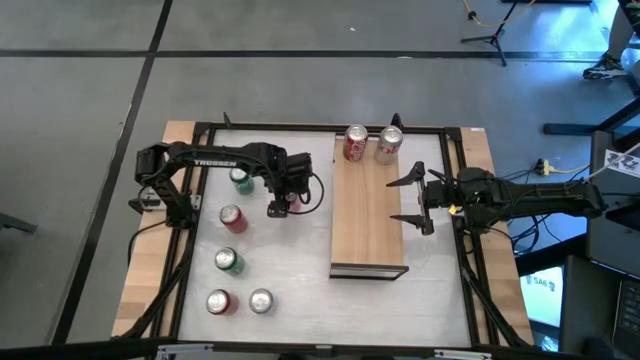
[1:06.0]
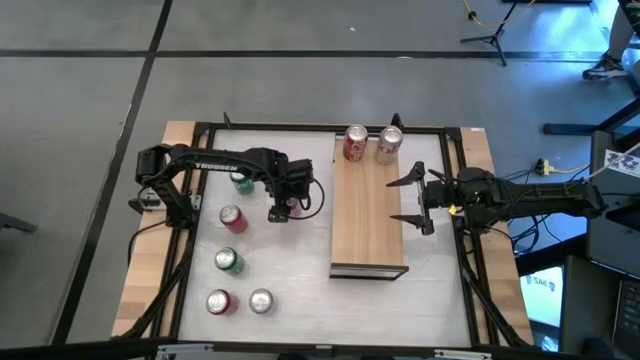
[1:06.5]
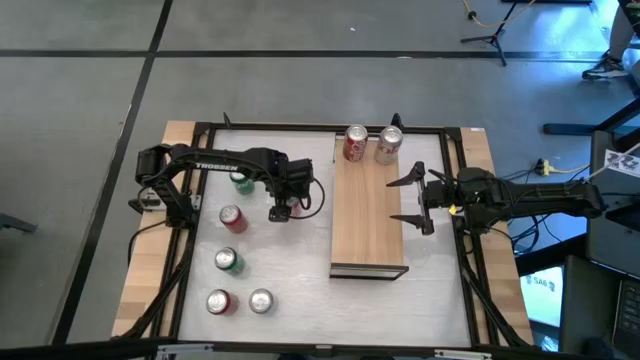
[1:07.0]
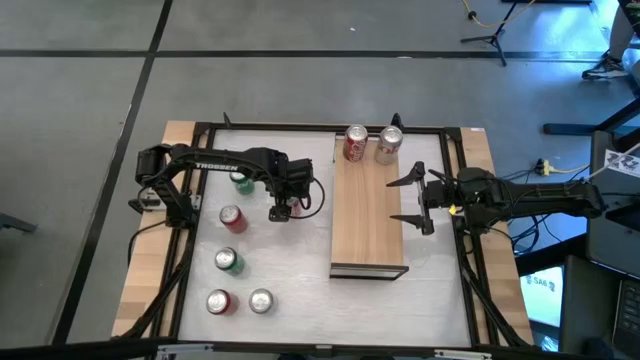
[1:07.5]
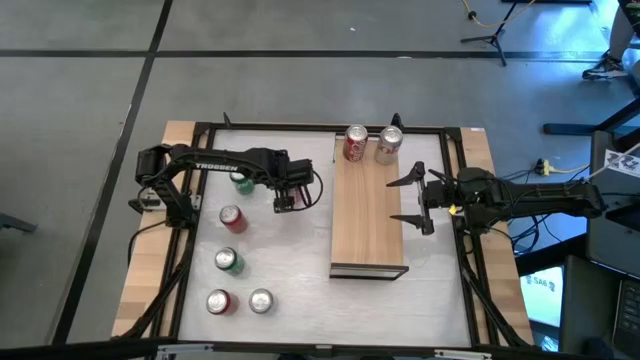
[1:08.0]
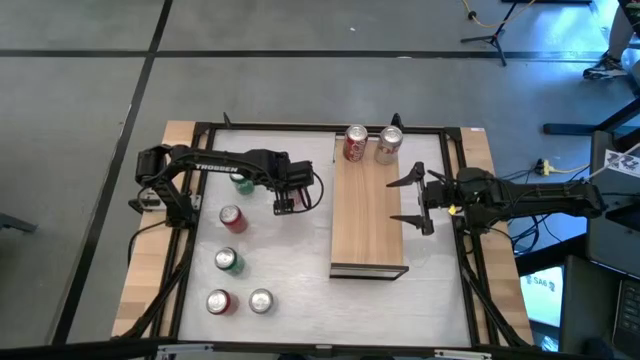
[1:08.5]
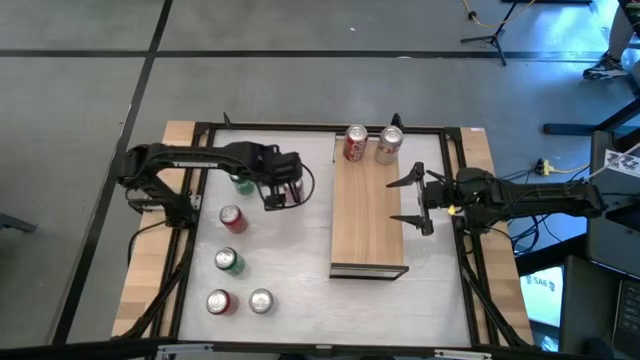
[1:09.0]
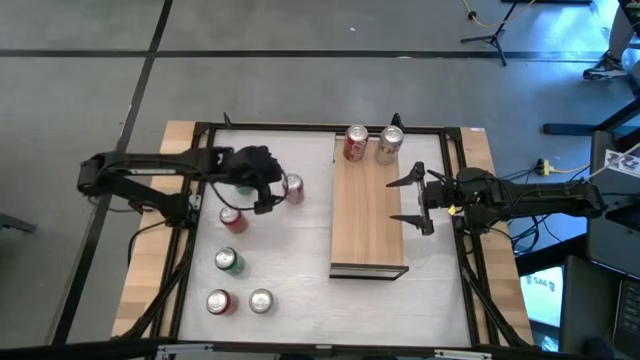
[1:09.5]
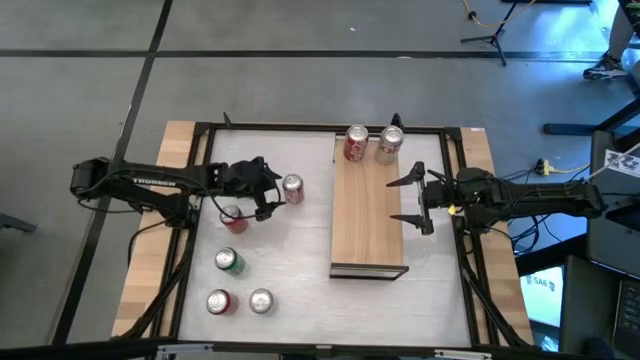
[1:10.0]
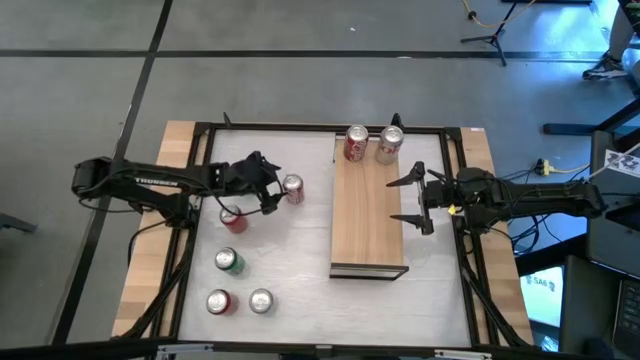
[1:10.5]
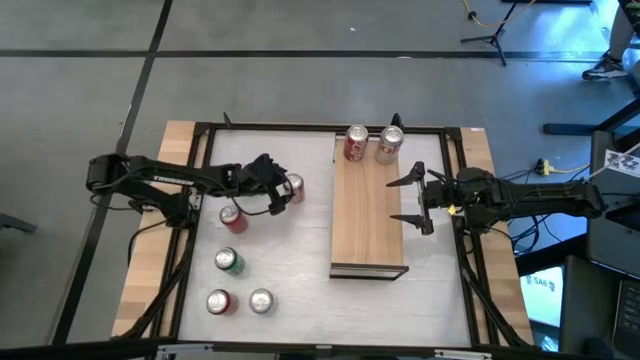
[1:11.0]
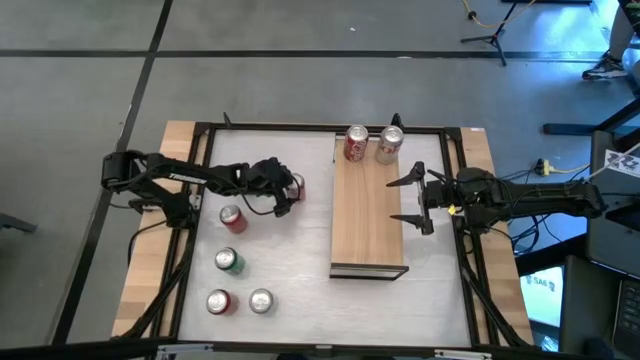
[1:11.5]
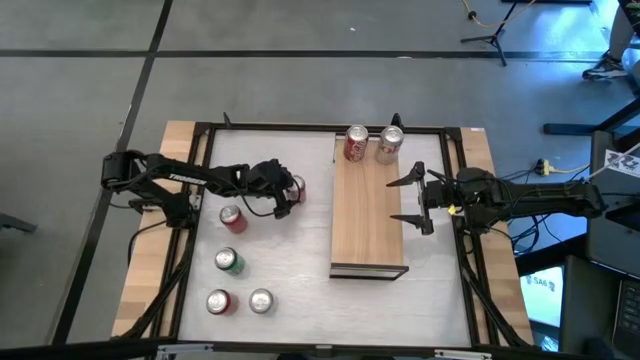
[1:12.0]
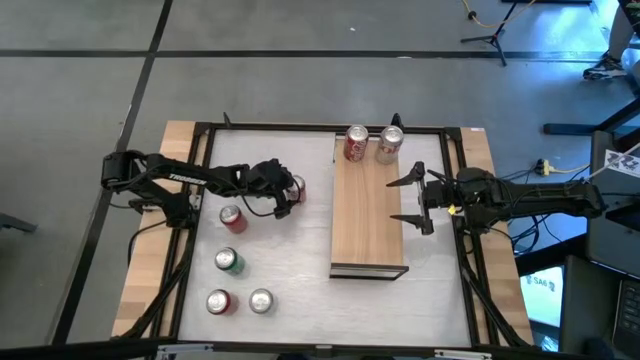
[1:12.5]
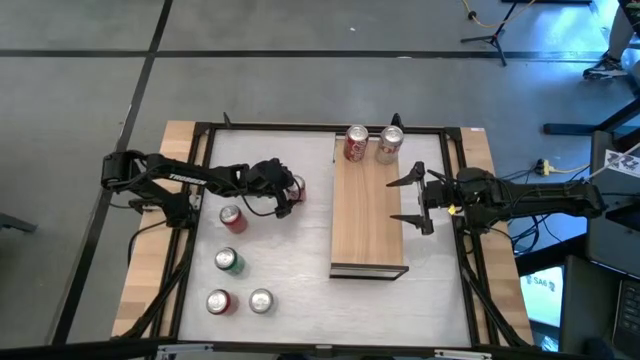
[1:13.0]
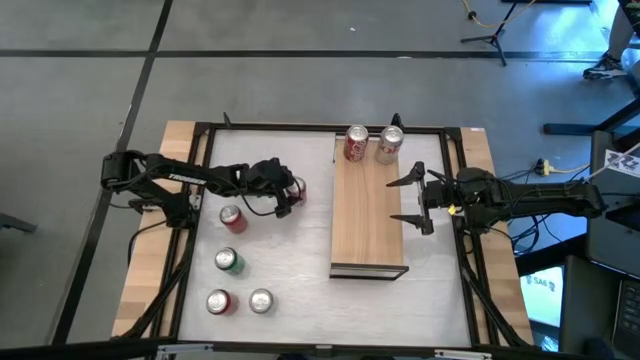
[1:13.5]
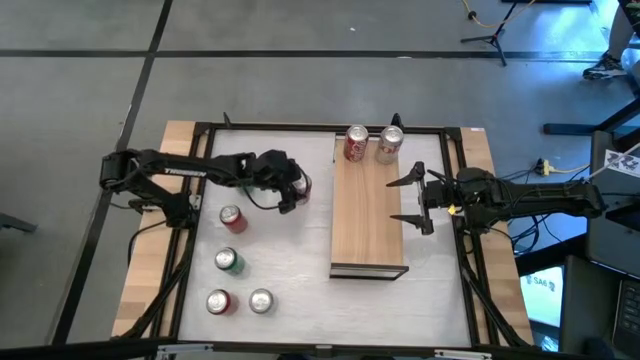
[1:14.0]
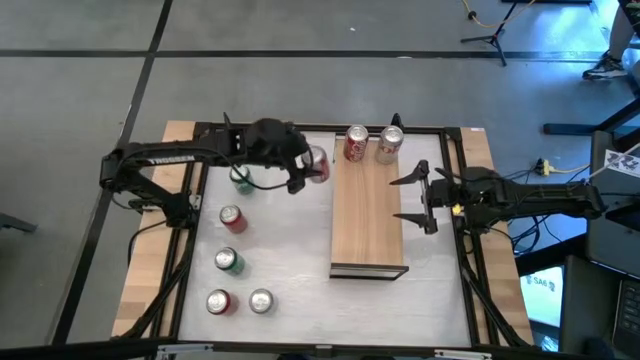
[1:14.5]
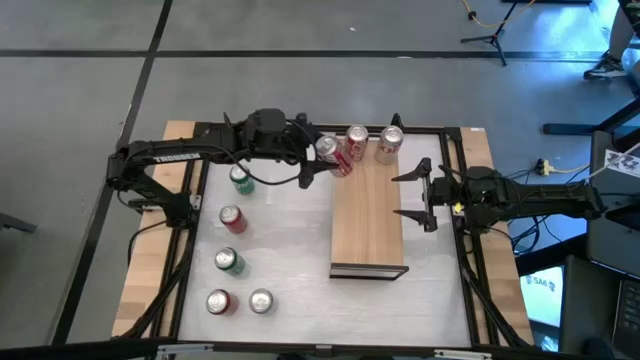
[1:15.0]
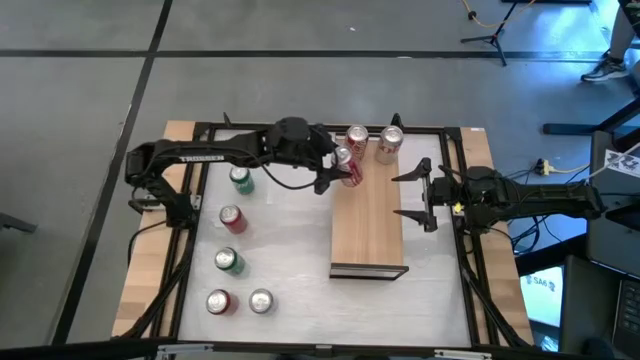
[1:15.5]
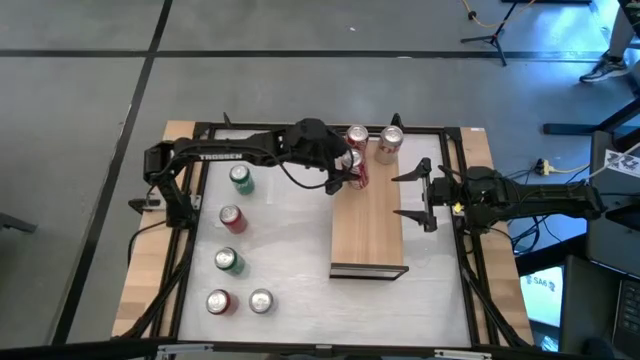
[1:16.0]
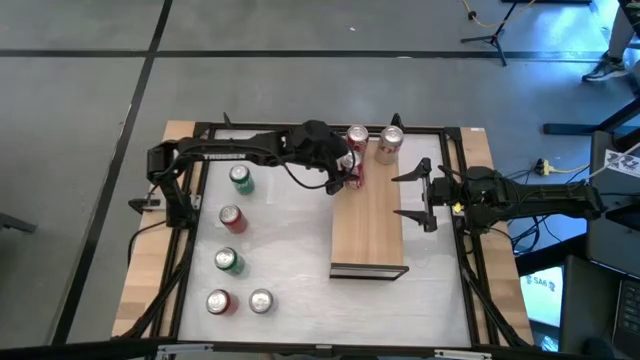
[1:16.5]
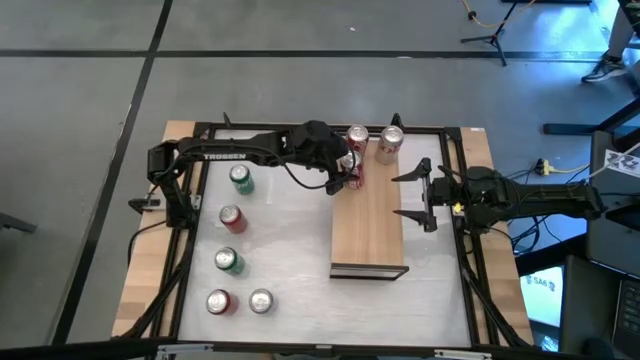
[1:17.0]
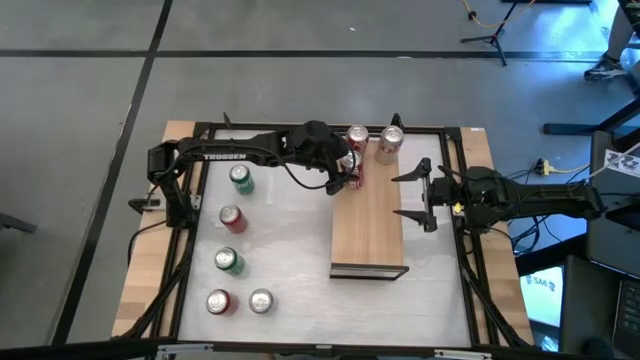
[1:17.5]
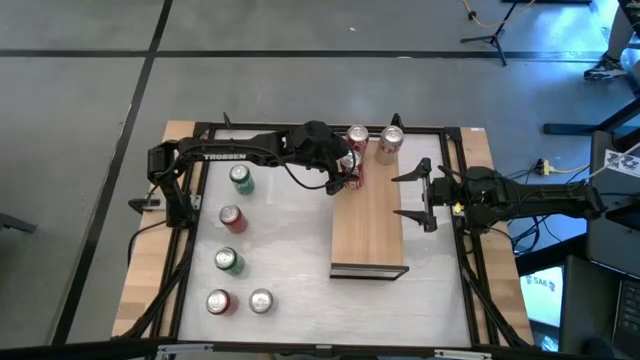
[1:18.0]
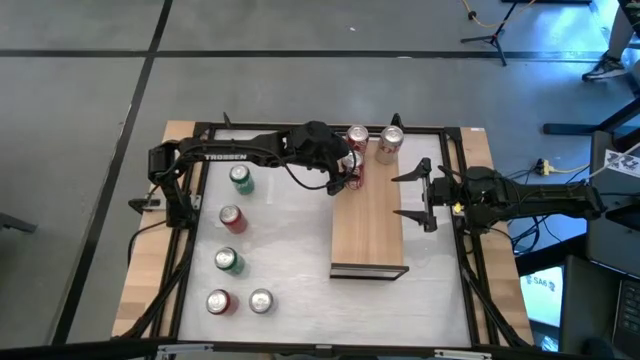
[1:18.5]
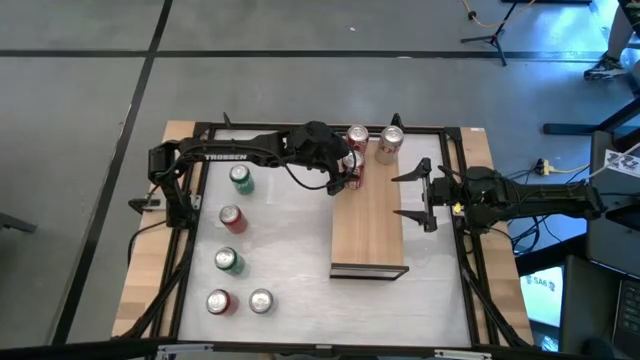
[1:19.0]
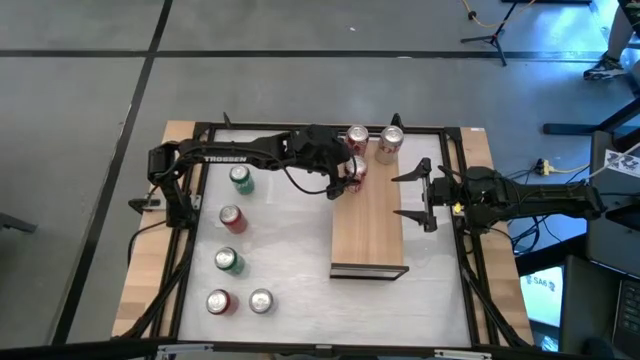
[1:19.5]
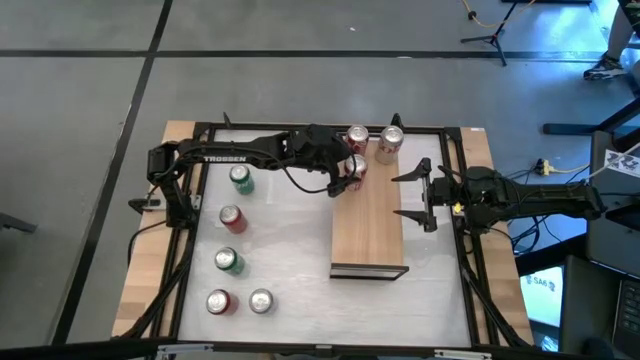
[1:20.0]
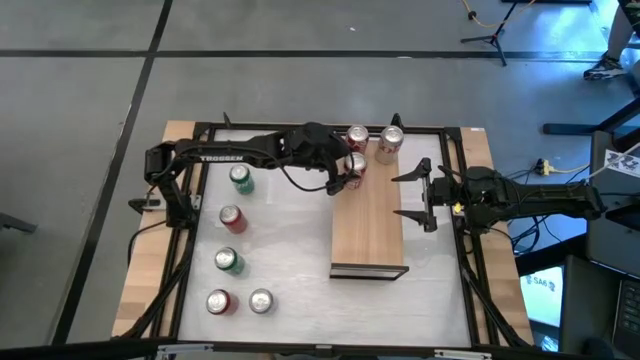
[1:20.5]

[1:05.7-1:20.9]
Task: Place canned beverage on shelf
Put the red white soda can on the shelf aligned with the other red white soda can

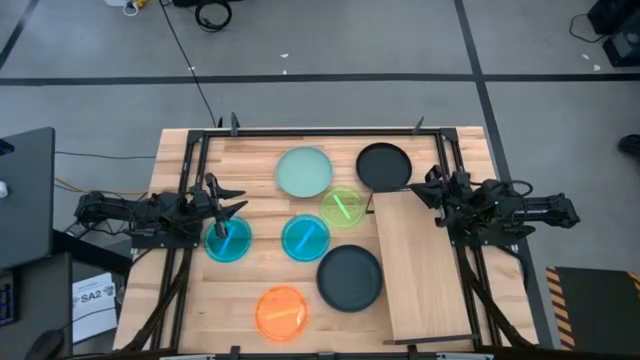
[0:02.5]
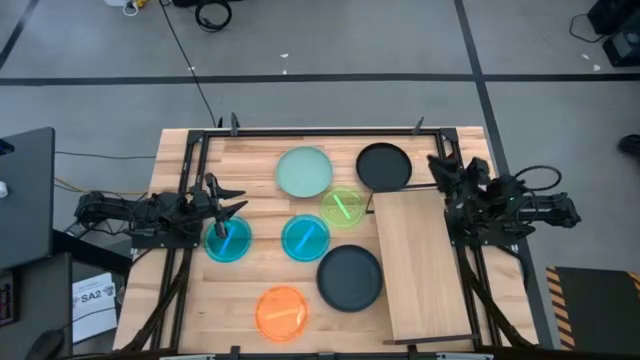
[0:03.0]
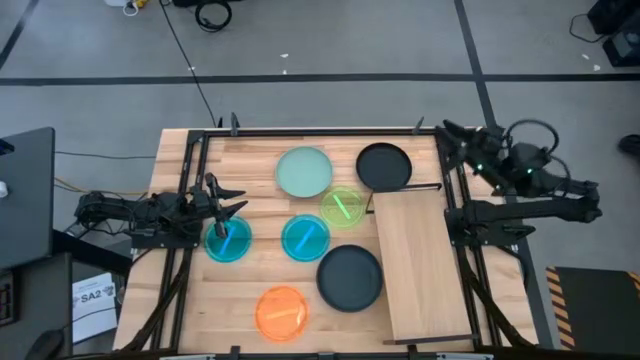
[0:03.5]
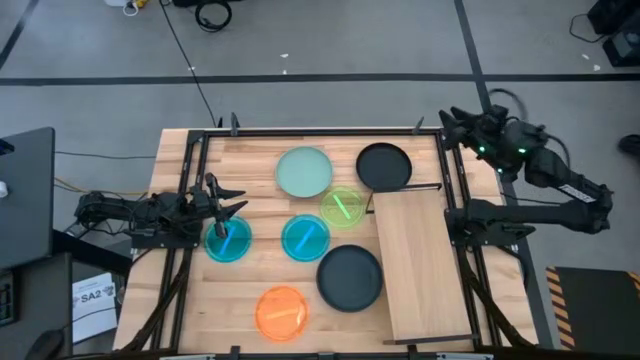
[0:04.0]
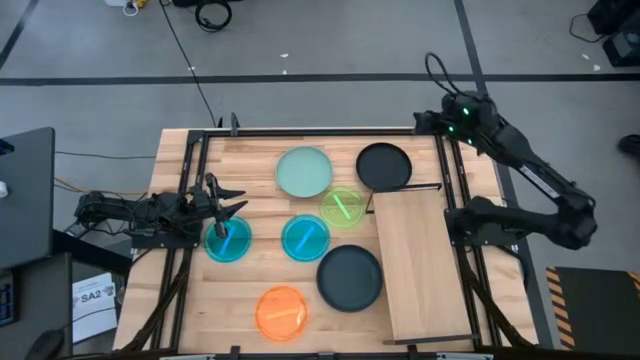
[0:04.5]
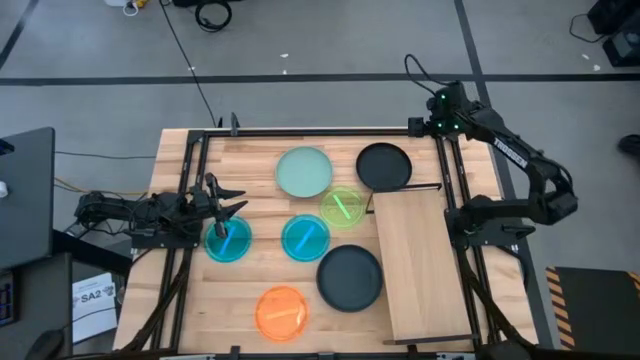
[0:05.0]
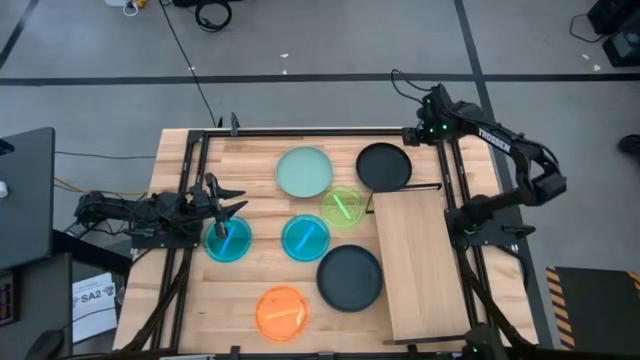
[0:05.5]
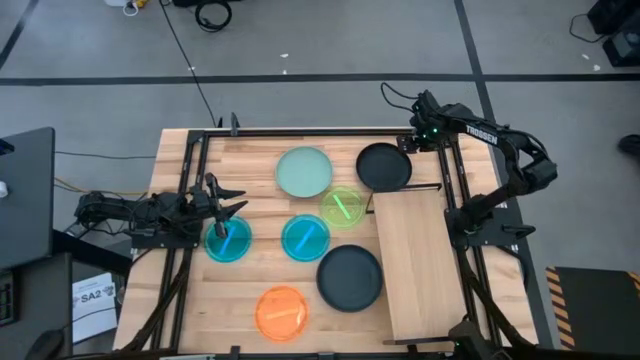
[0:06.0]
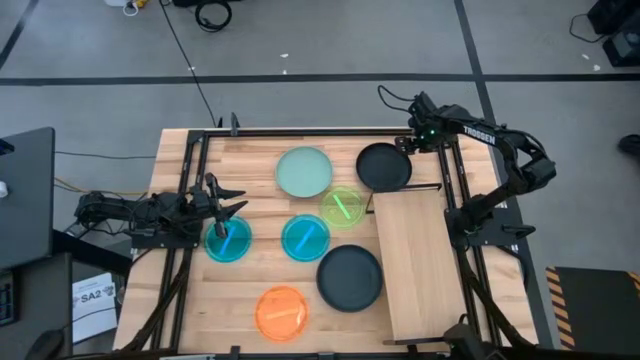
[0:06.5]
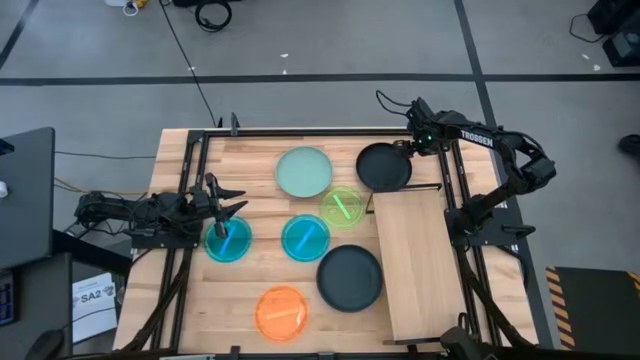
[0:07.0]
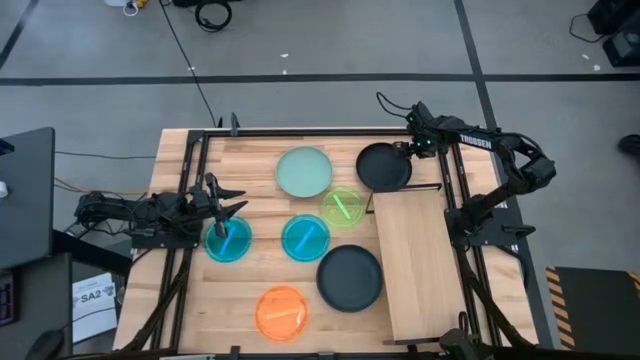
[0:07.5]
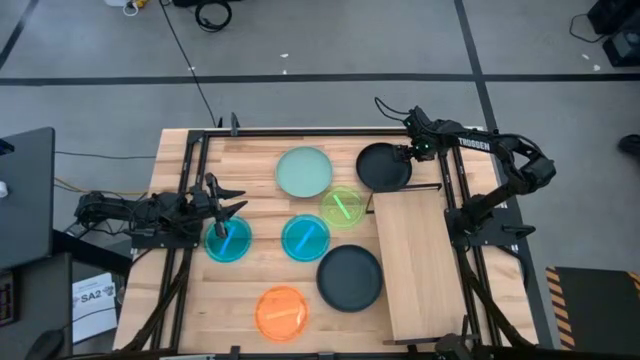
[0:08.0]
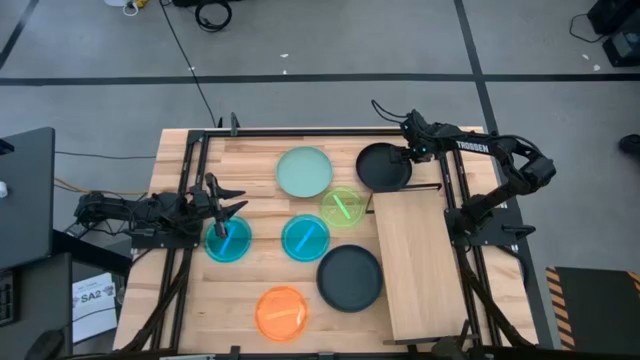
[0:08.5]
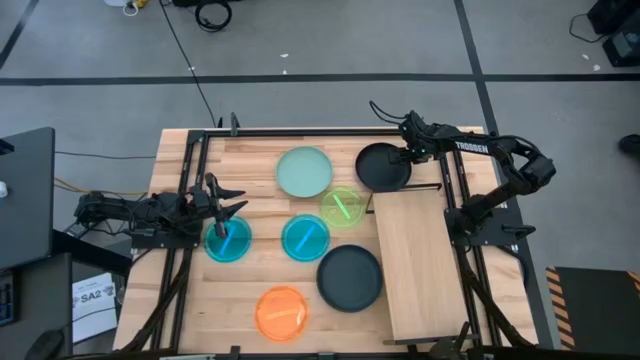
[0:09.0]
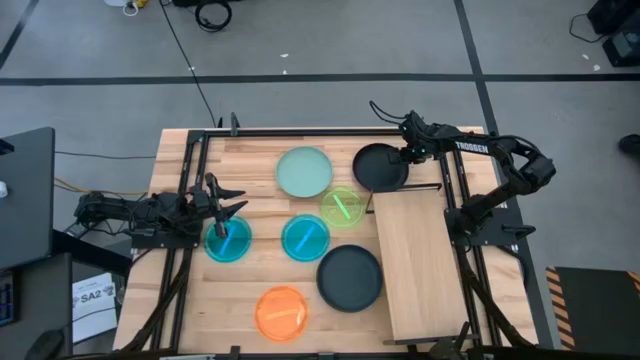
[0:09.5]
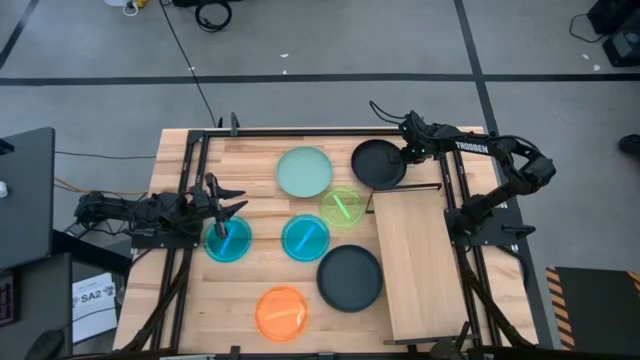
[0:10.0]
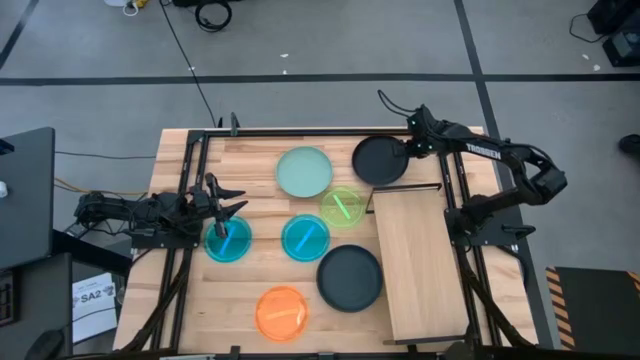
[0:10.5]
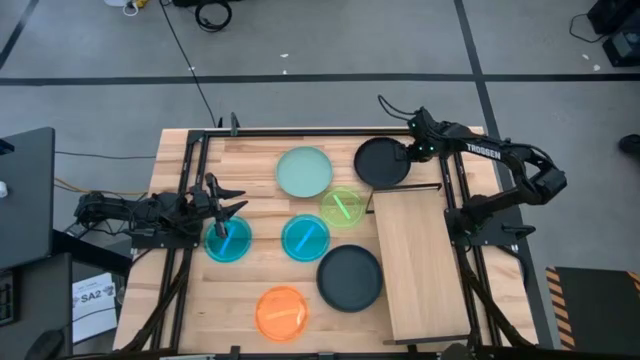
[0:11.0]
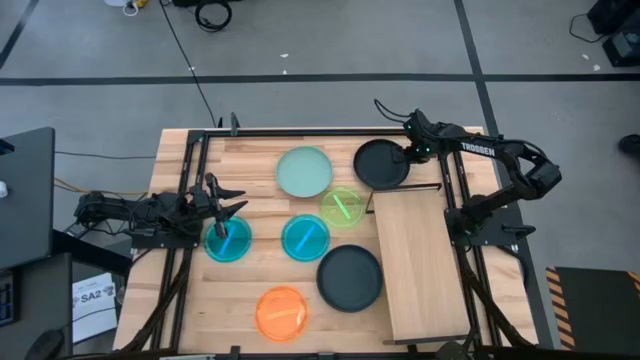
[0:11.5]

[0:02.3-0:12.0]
Task: Place and stack plates onto a shelf
Put the top black plate on the shelf
